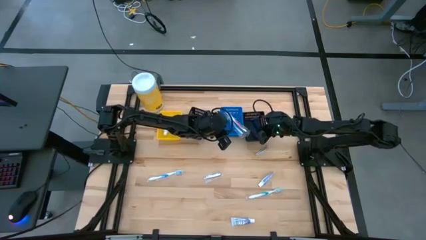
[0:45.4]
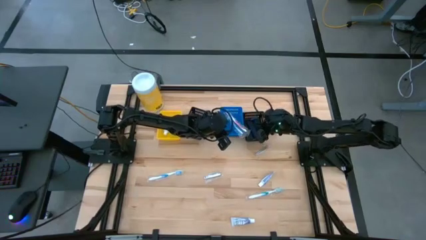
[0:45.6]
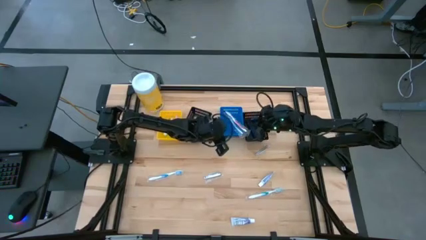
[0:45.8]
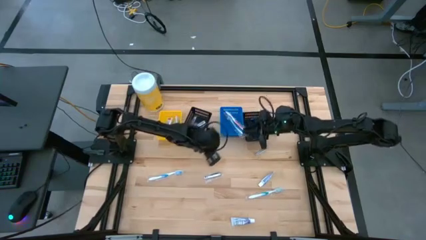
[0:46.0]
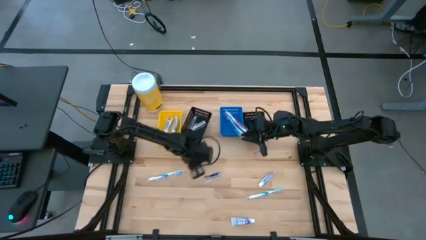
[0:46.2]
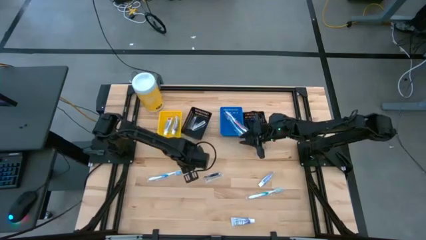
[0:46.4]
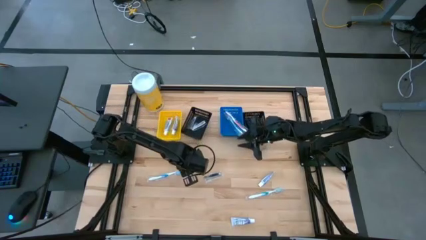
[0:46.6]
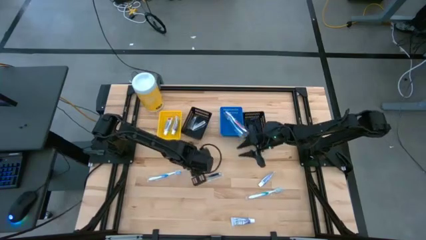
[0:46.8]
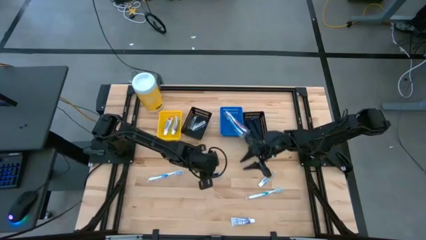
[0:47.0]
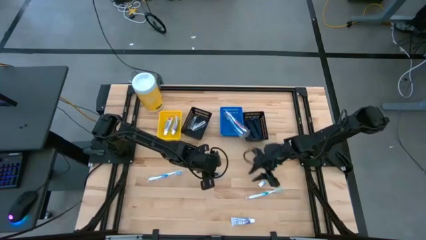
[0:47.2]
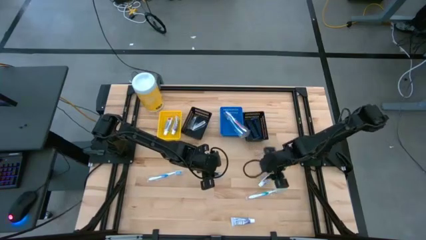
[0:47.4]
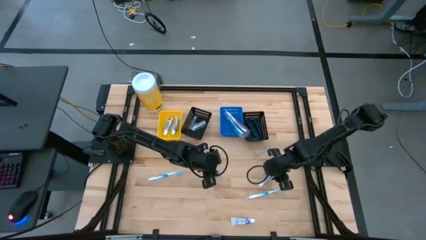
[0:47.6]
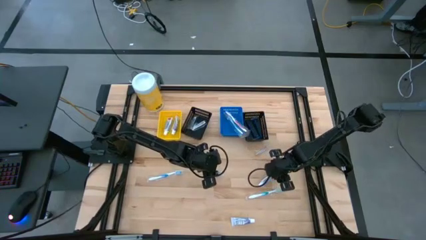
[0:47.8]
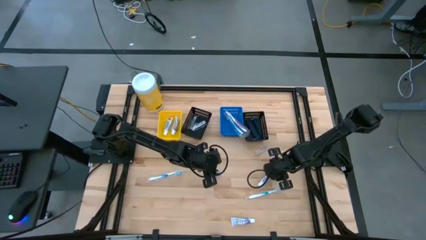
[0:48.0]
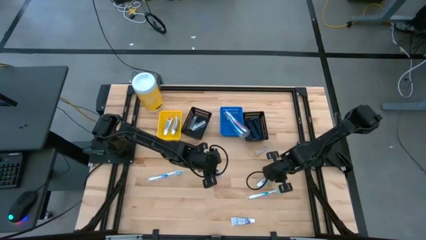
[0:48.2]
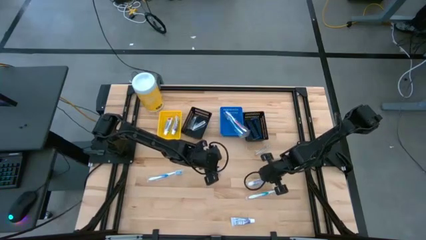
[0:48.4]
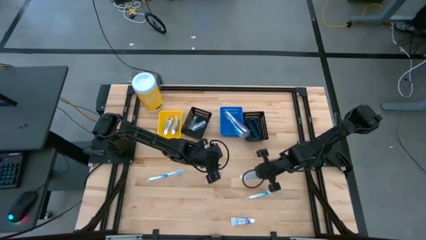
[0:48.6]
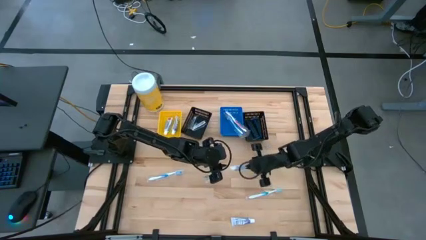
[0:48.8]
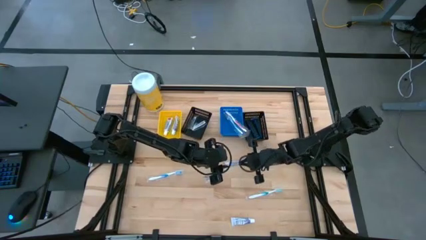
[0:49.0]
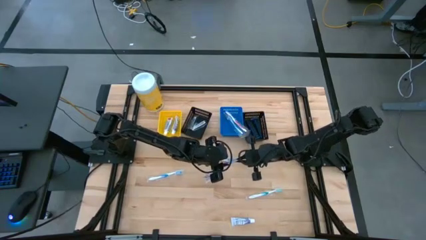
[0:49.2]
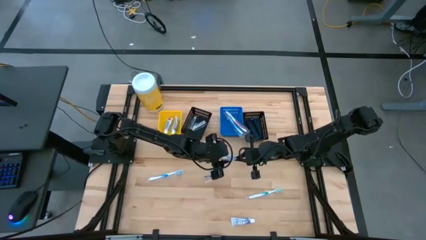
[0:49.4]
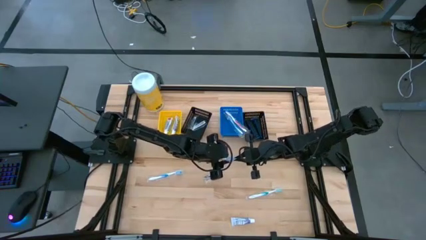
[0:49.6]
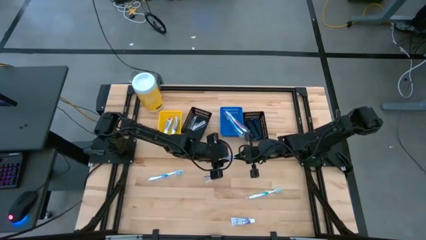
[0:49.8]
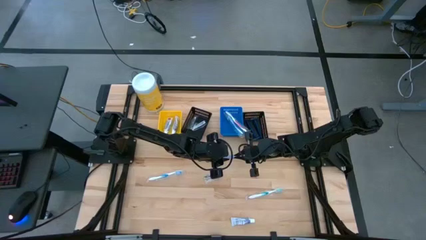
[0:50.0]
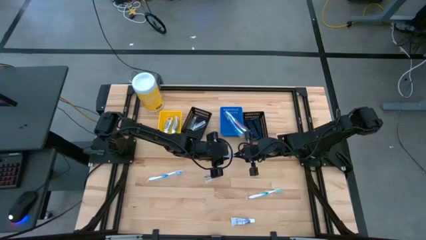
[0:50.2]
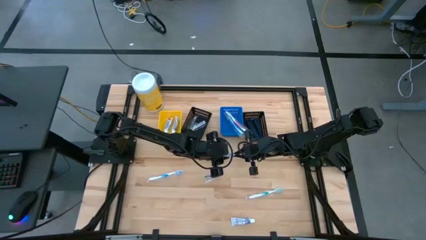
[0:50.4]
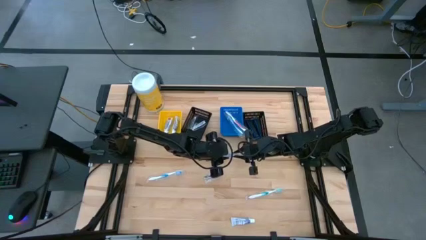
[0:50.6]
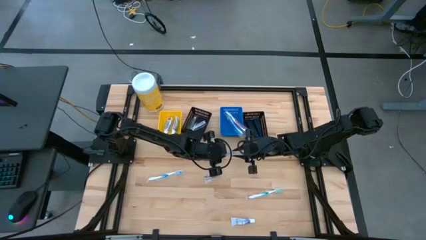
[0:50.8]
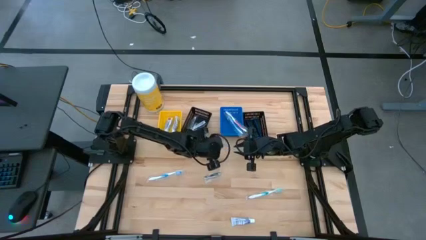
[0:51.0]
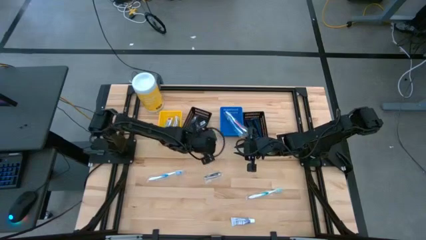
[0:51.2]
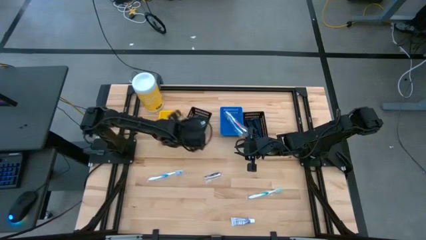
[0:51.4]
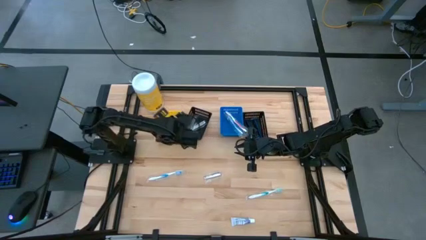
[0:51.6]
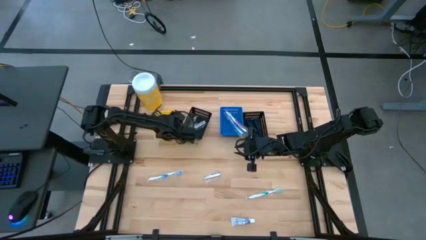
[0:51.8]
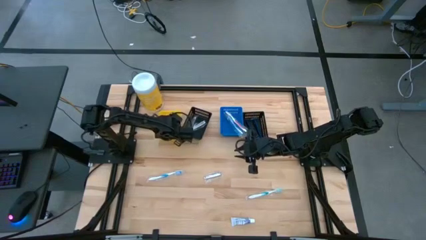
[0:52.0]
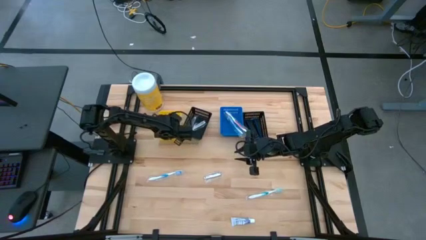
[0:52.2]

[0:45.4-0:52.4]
Task: Pick & Place Travel size toiletries
Put the white toothpaste into the yellow bin

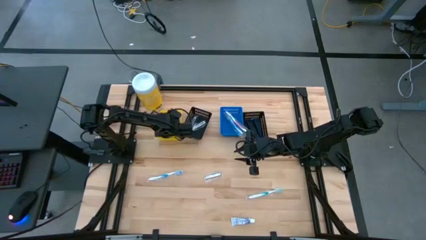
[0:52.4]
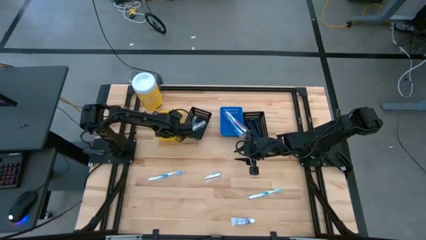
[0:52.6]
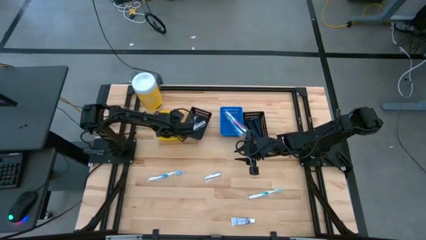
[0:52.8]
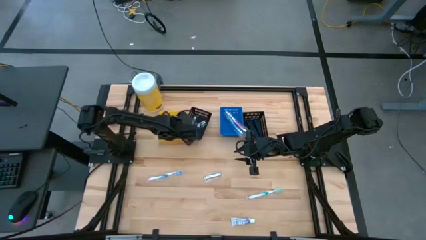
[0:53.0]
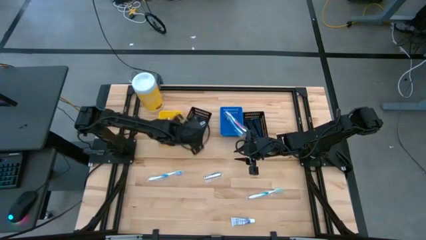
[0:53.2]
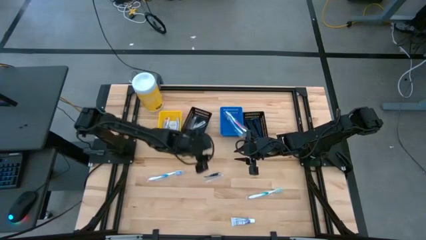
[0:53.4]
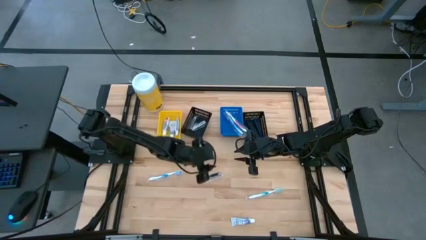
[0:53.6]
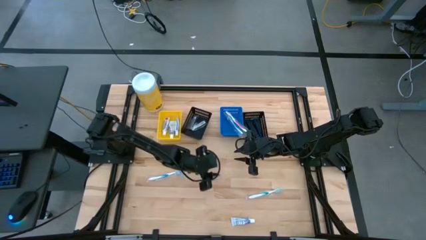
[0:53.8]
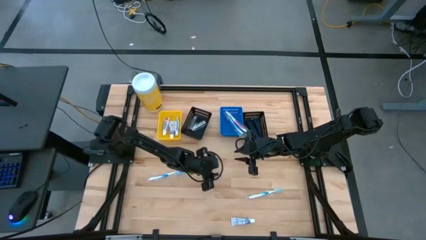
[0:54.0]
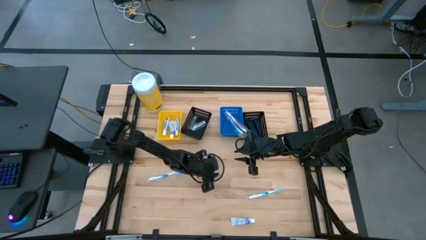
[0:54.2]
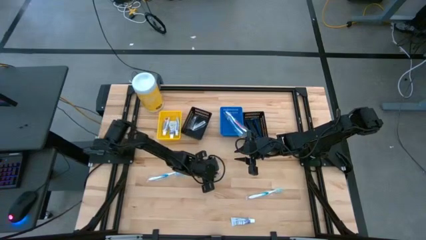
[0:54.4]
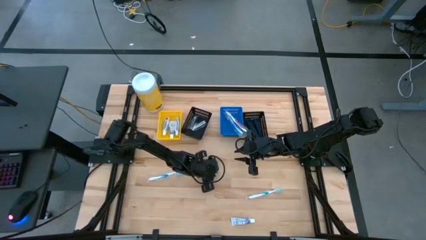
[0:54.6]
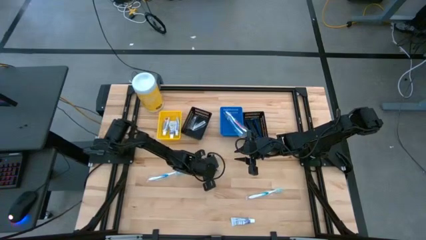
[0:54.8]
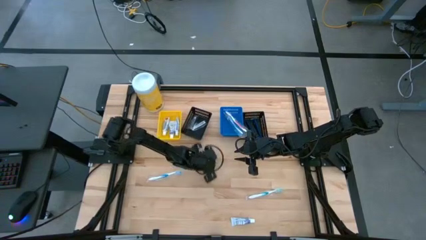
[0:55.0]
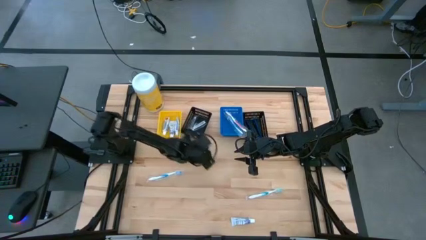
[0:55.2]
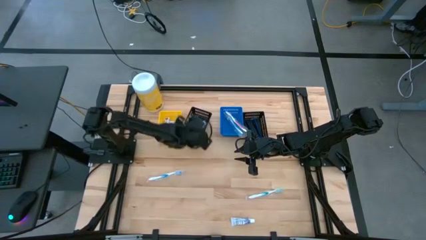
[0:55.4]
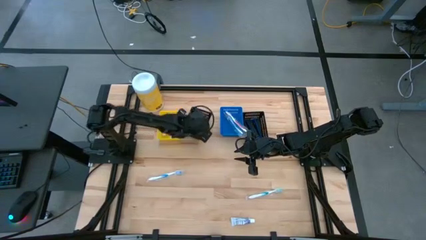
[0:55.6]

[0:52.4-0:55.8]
Put the silver nail cutter into the right black bin

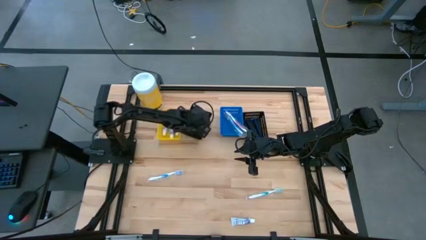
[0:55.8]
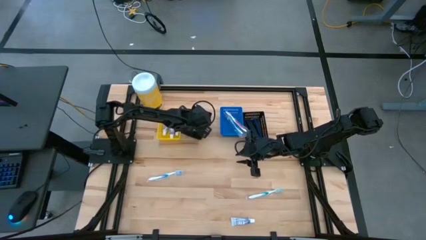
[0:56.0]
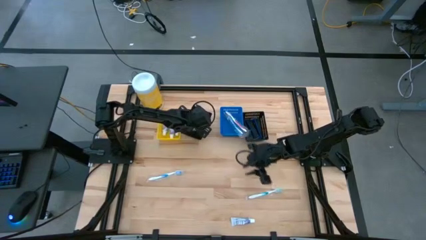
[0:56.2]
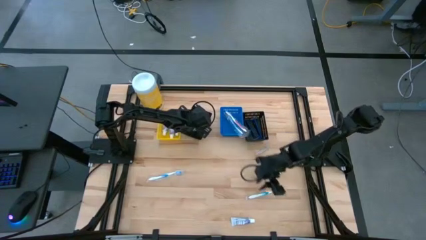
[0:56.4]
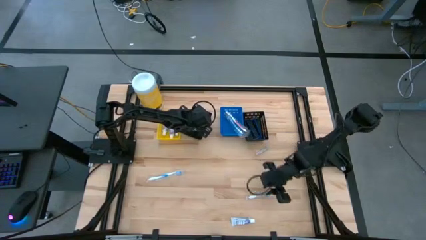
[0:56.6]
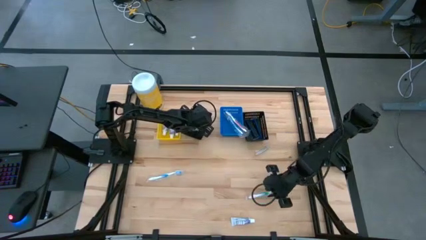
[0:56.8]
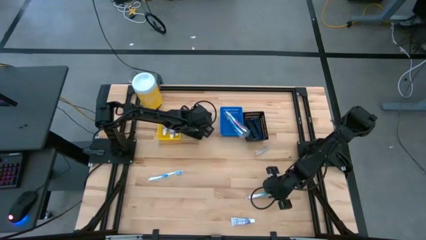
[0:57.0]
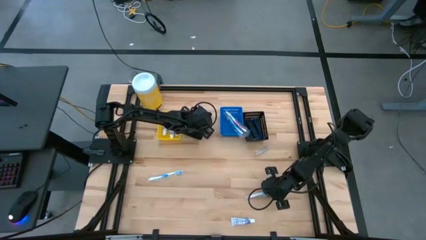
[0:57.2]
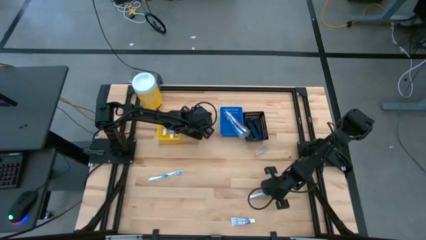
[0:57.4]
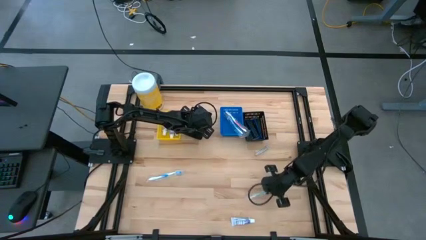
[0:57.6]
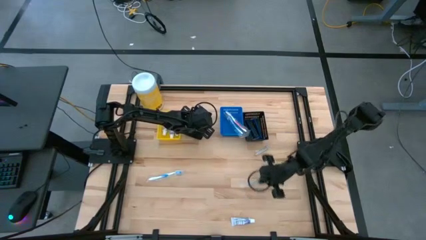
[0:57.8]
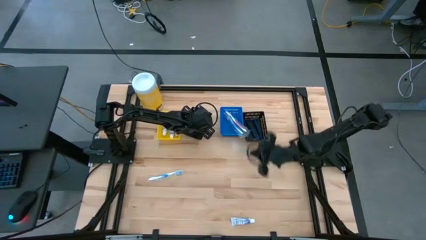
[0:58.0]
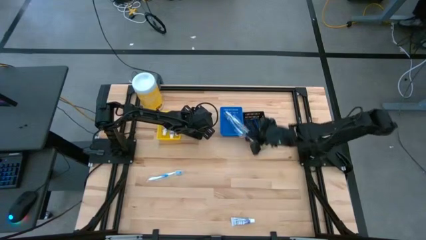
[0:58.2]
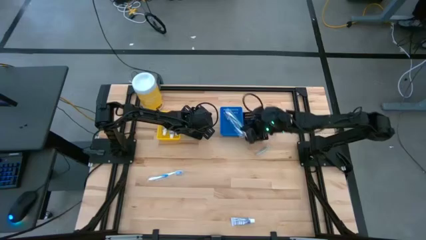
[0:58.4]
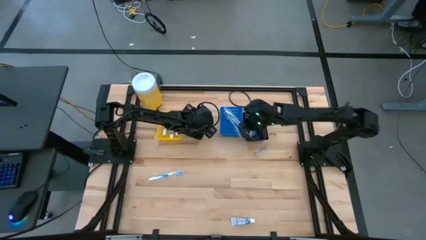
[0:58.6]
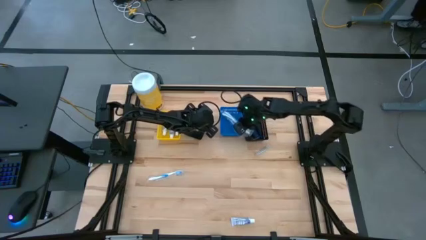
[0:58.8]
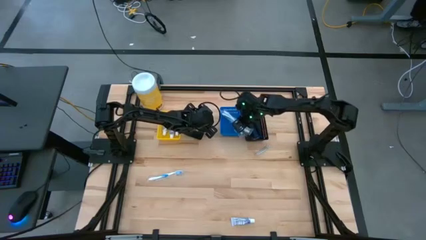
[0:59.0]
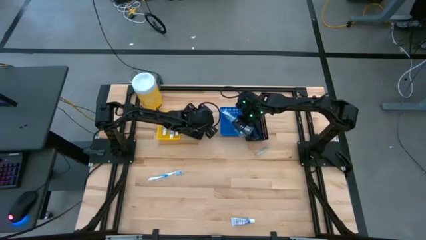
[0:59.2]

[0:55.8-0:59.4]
Put the green toothbrush into the blue bin

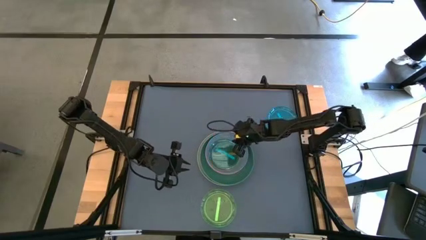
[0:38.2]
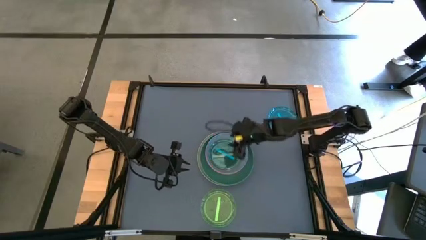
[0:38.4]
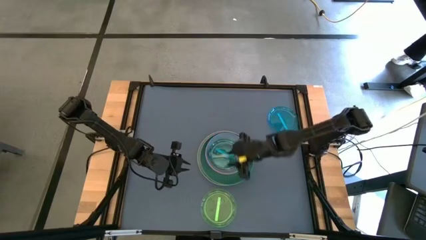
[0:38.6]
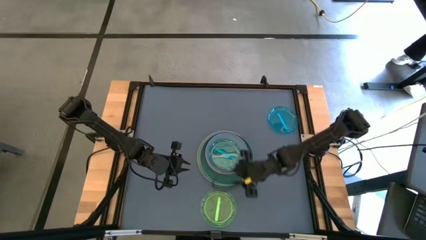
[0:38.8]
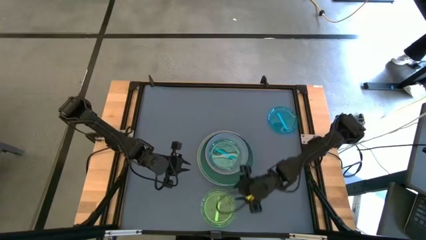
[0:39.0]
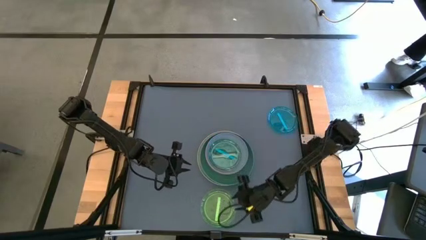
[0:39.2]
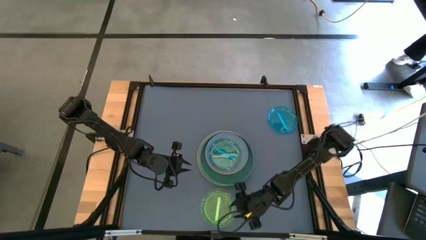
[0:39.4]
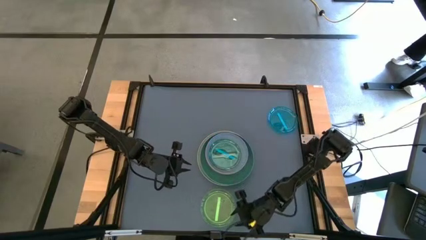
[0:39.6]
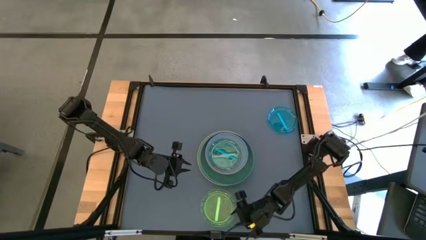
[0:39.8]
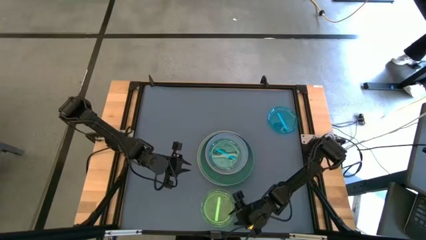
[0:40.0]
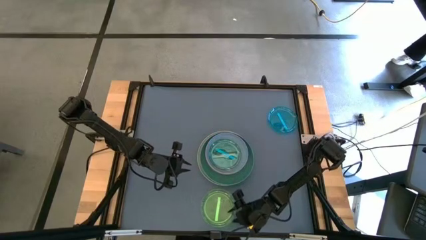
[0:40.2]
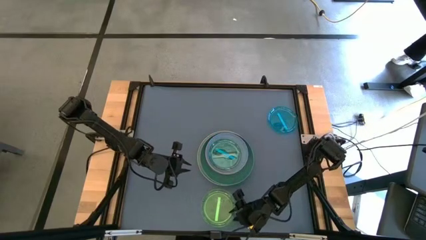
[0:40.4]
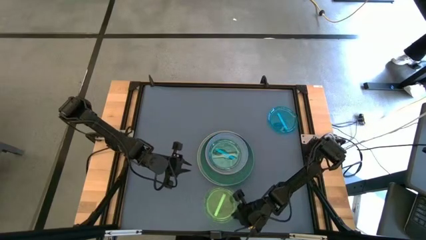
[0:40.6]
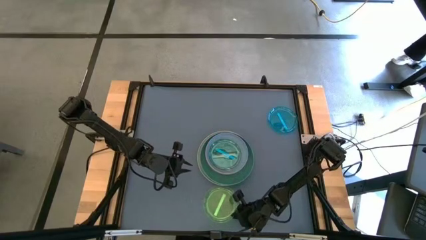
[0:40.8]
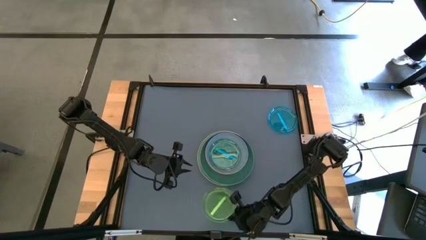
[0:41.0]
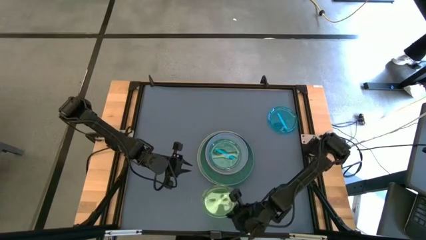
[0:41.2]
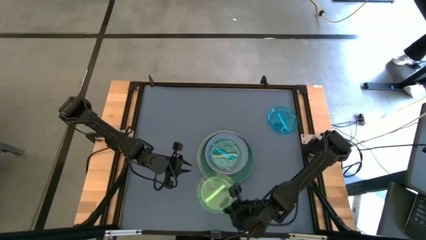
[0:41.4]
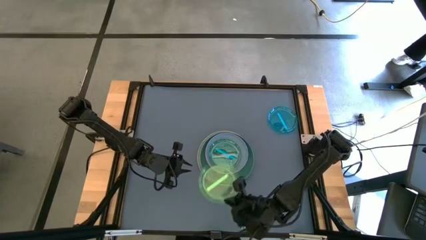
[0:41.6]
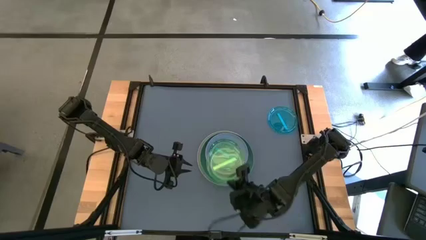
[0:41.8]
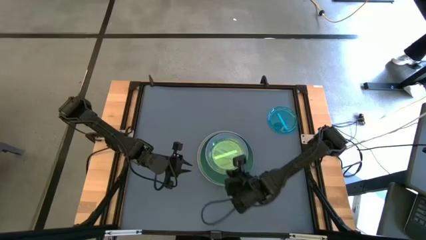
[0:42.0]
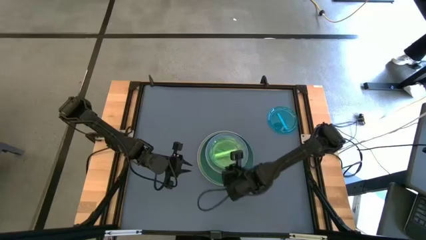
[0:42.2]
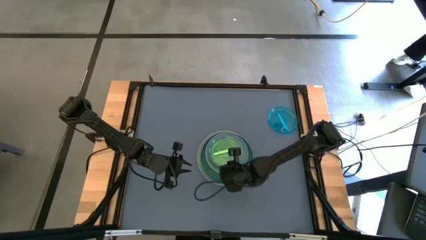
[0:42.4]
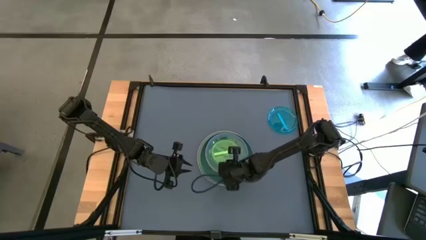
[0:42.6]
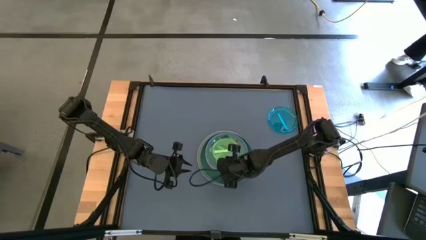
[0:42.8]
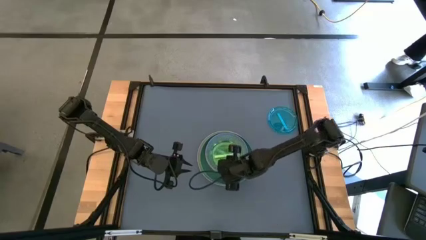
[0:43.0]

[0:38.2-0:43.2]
Task: Stack plastic plates
Stack the light green plate on top of the light blue plate
